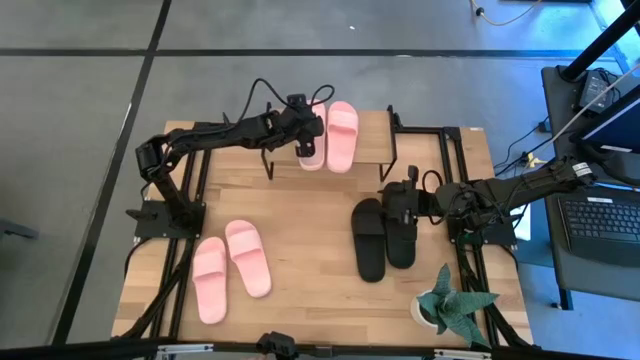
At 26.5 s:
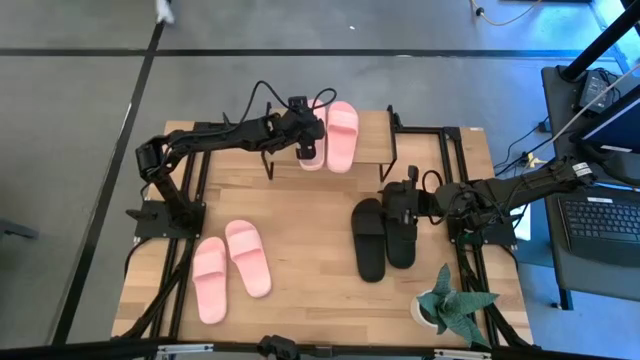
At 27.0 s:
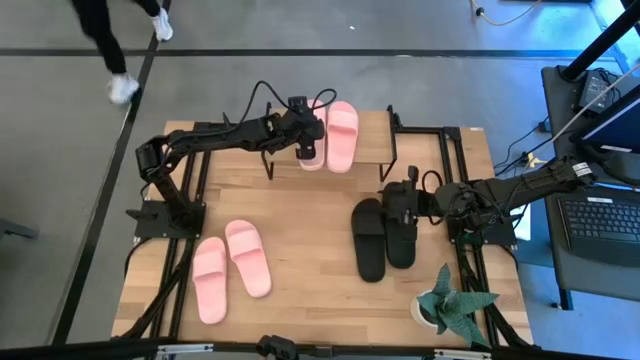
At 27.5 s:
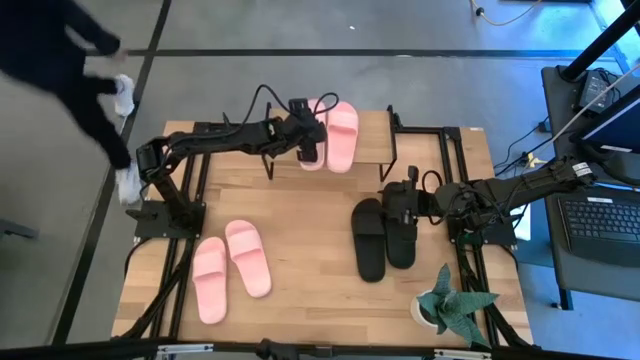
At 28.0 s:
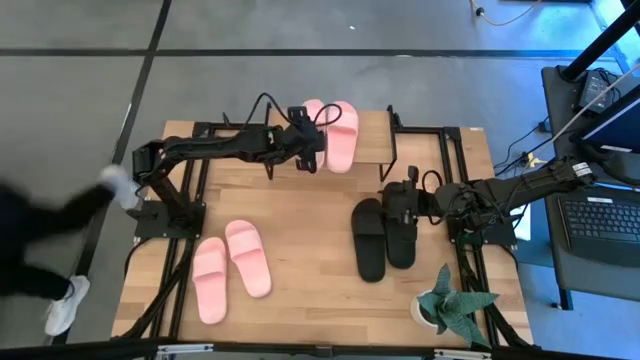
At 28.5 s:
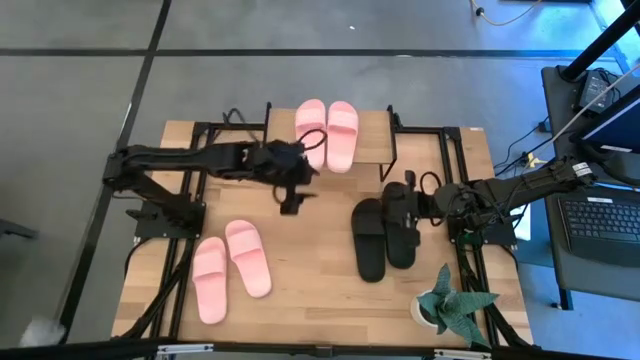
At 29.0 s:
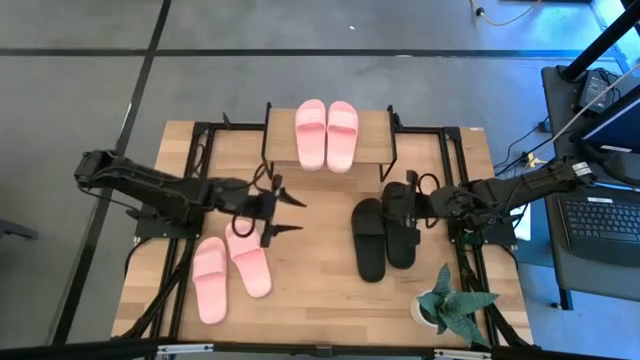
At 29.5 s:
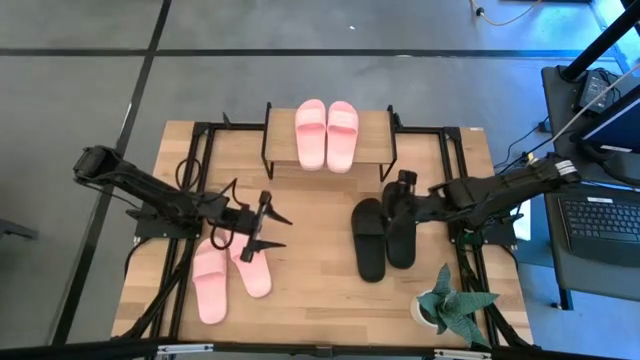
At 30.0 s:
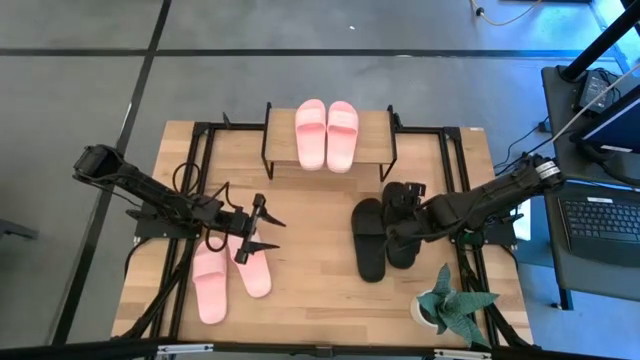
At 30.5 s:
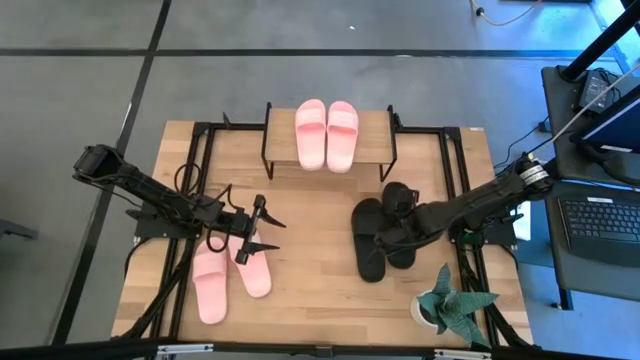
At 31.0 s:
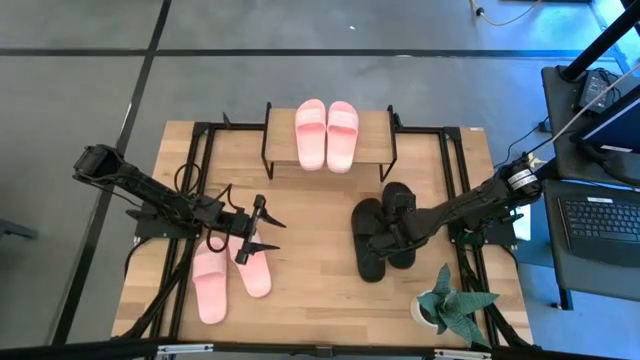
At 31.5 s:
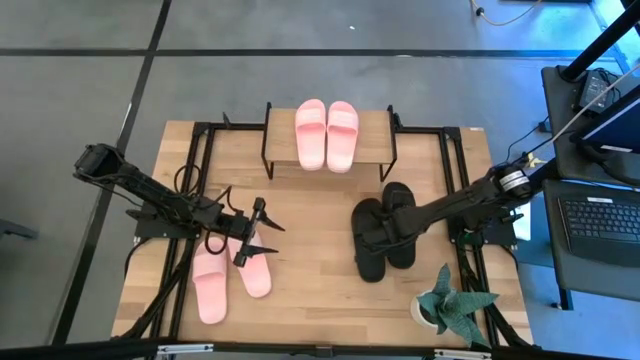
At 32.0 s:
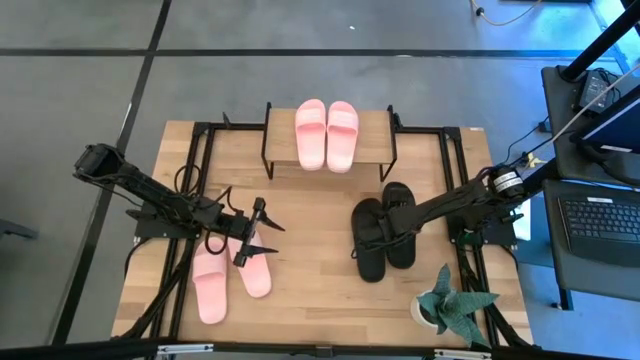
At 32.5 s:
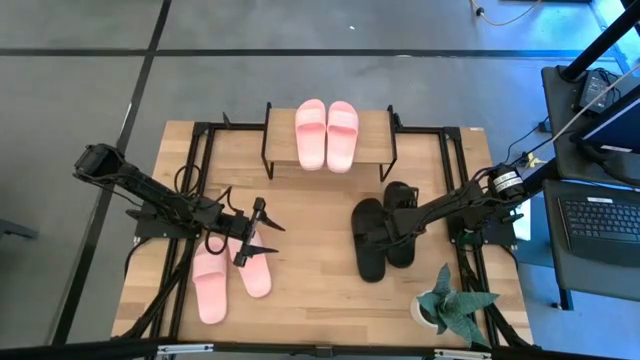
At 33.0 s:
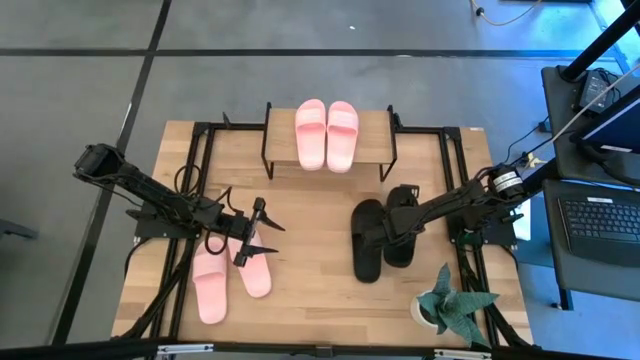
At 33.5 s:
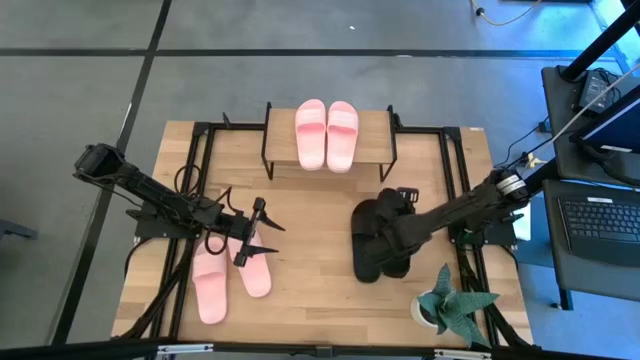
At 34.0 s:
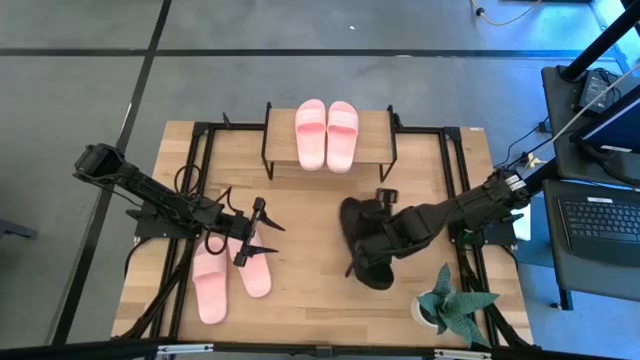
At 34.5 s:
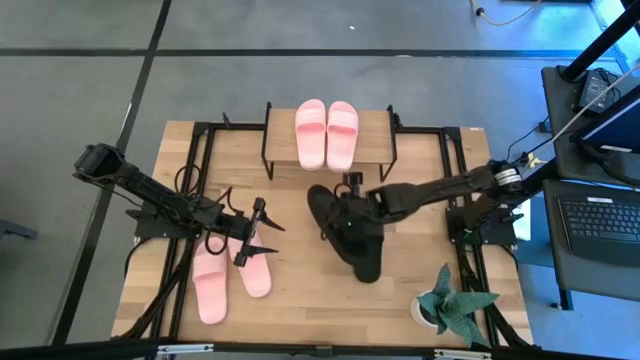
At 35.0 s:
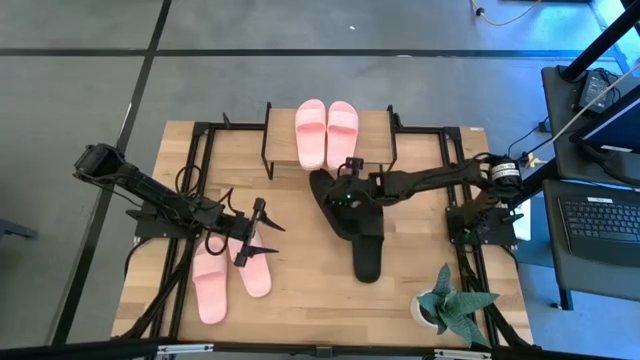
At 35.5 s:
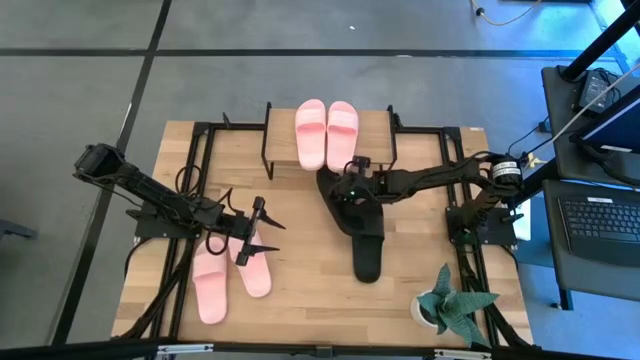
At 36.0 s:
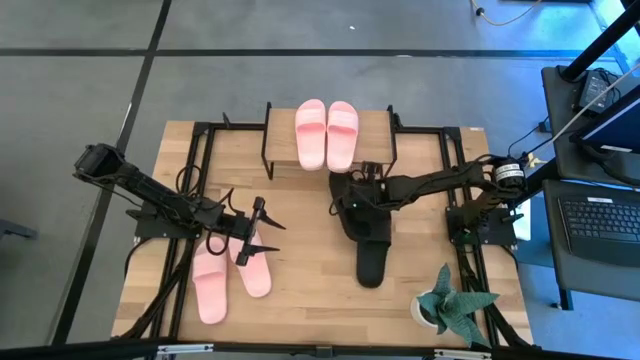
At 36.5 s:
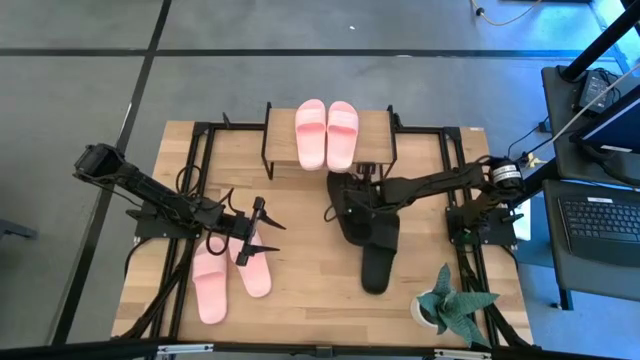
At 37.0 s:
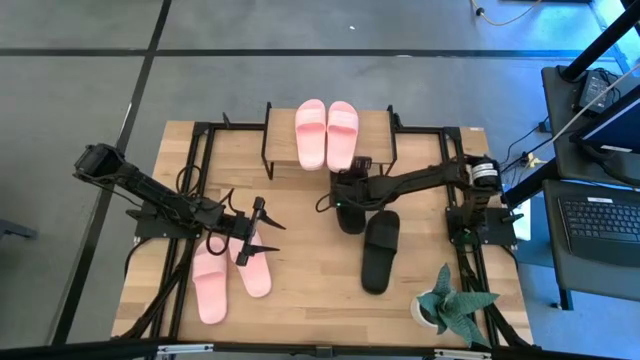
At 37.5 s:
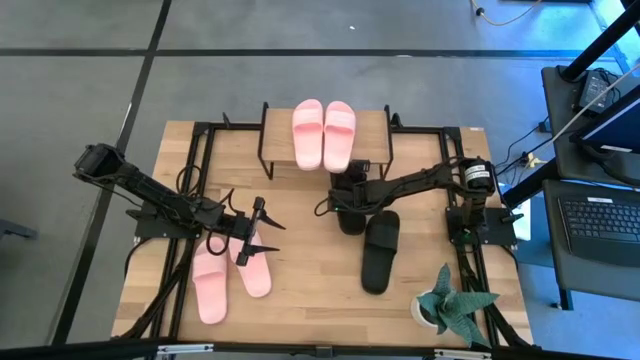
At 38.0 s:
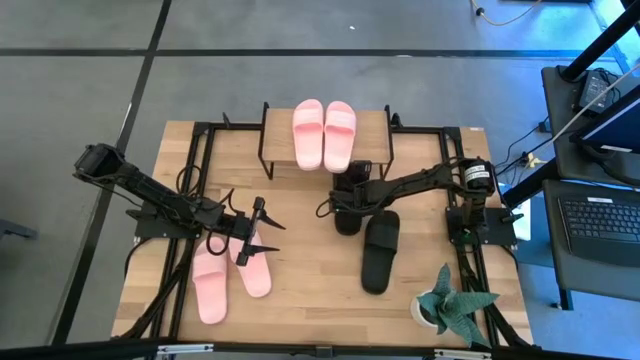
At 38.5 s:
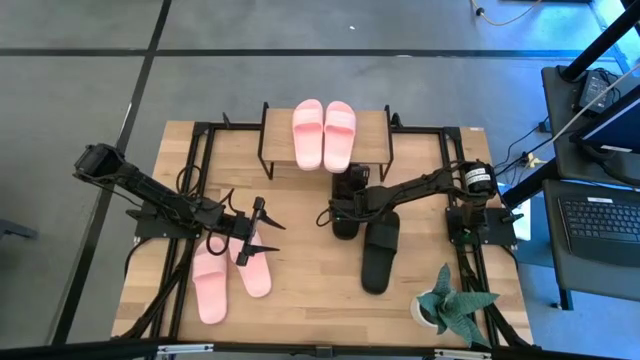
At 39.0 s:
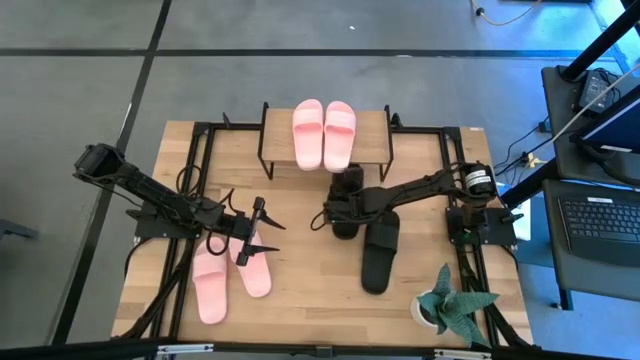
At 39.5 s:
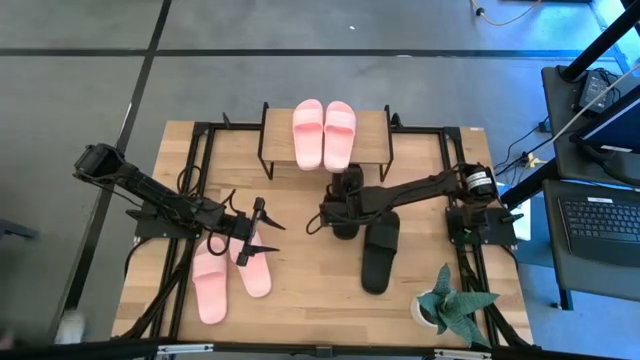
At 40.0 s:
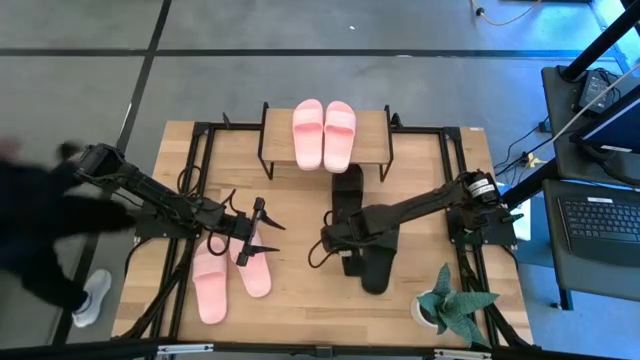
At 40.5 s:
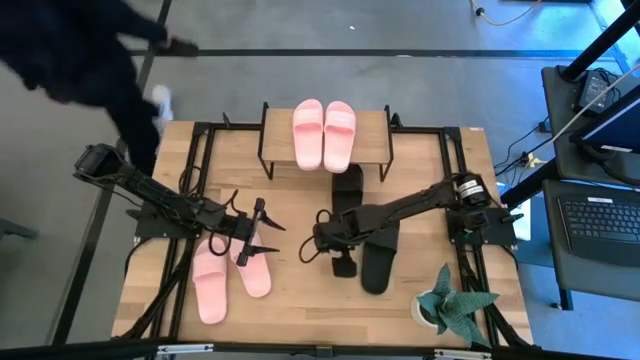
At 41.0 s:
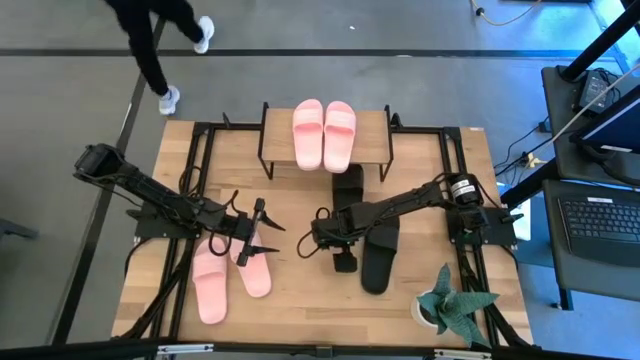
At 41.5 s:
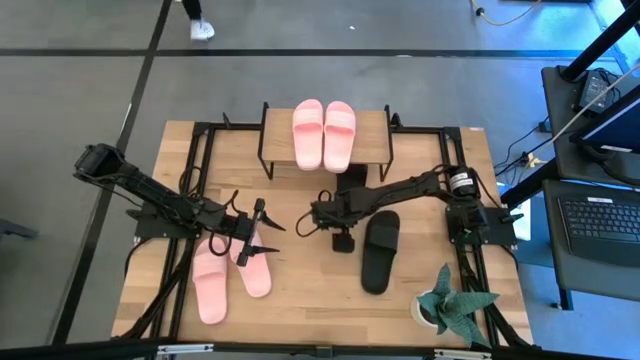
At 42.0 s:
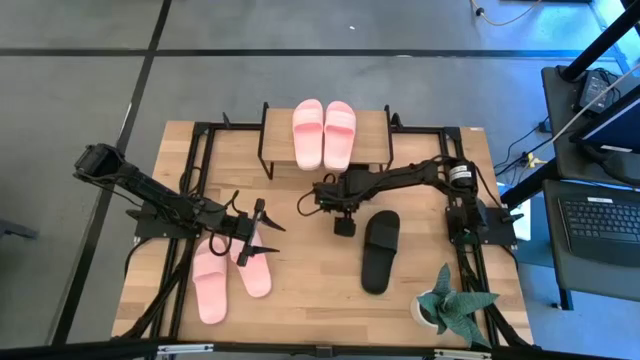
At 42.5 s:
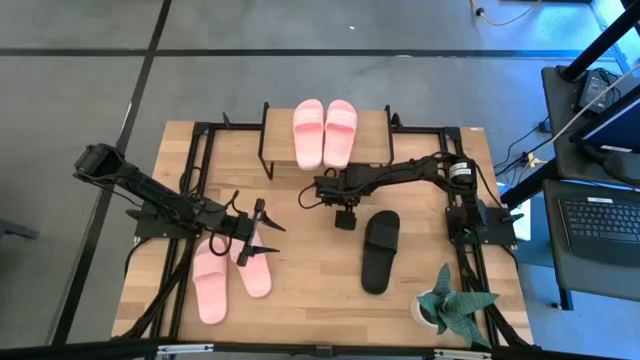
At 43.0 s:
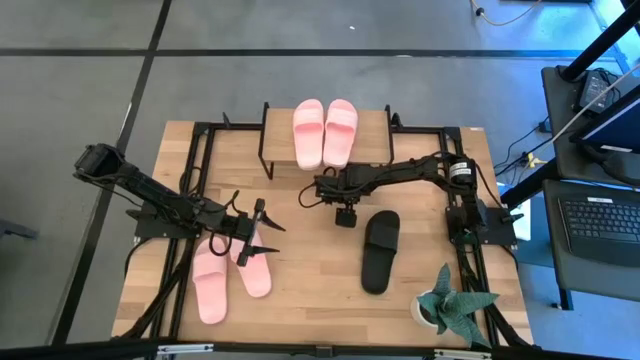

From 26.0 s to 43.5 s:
Task: Pick and place slides into the shelf
Put the black slipper slide under the shelf

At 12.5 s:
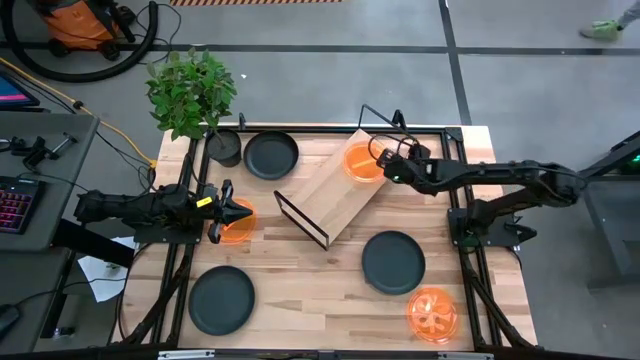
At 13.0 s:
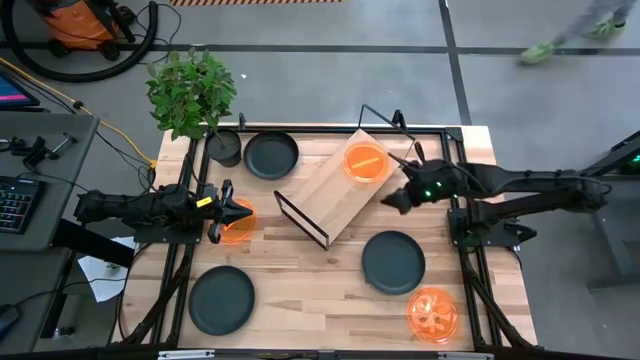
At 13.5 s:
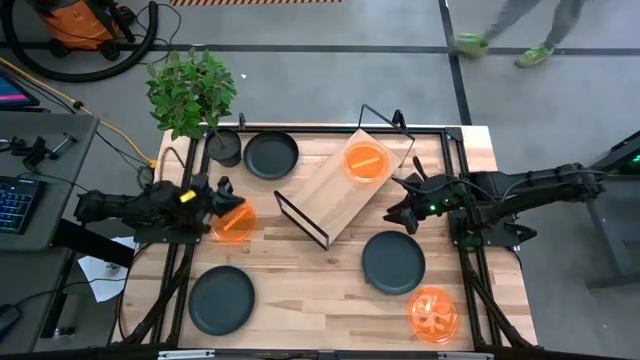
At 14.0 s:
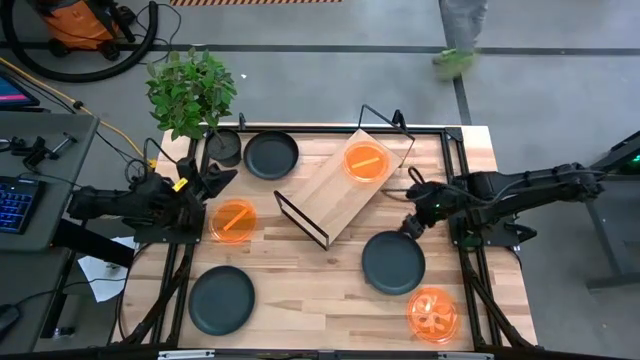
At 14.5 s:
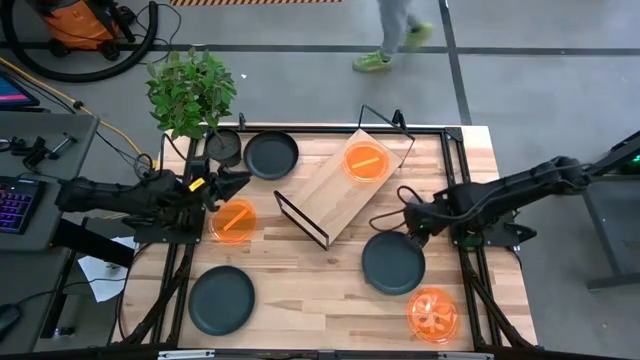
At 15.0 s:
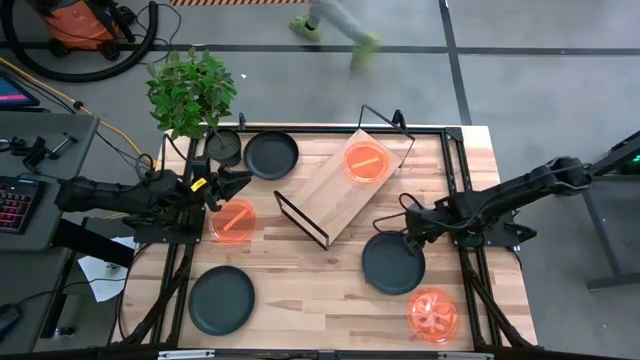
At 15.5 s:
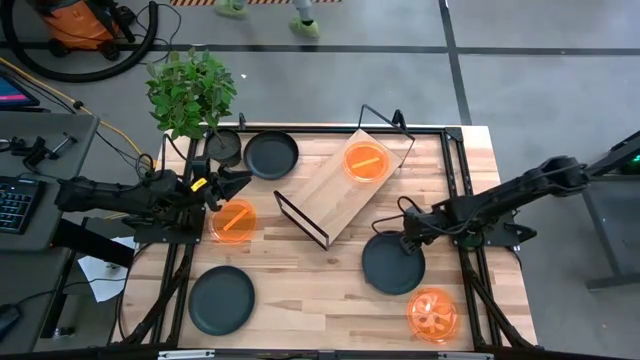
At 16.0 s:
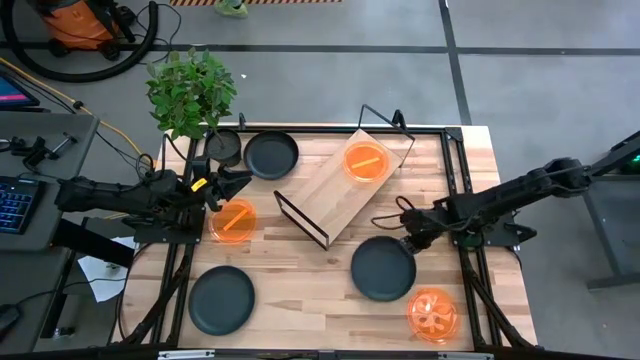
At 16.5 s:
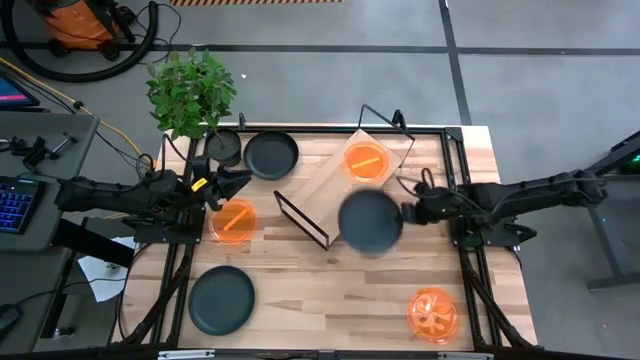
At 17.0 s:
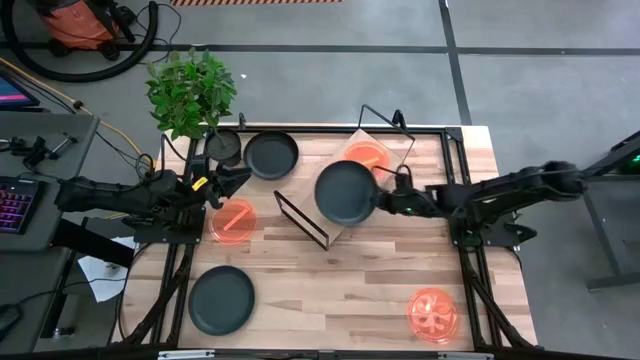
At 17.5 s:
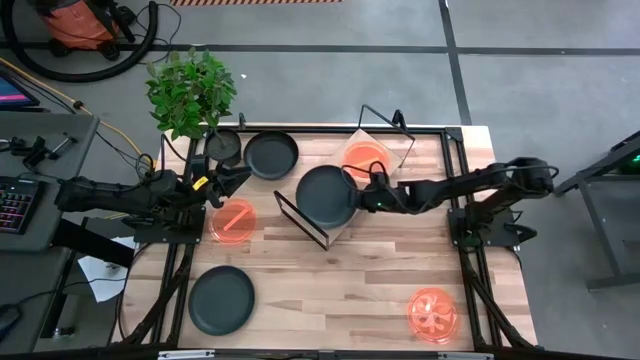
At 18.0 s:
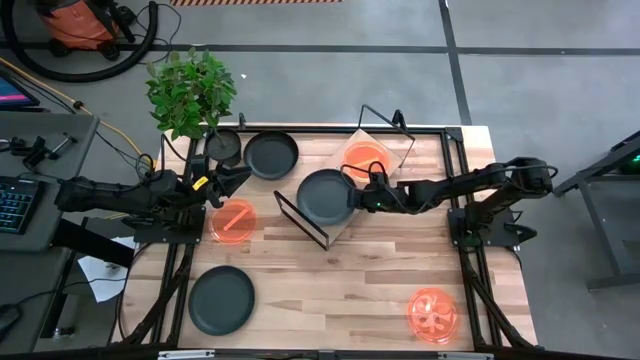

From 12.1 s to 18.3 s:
Task: Place and stack plates onto a shelf
Put the right black plate on the shelf
